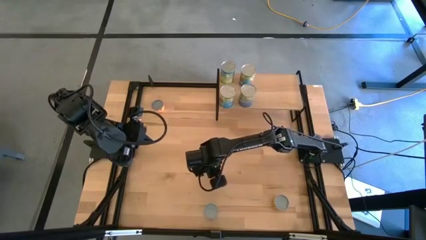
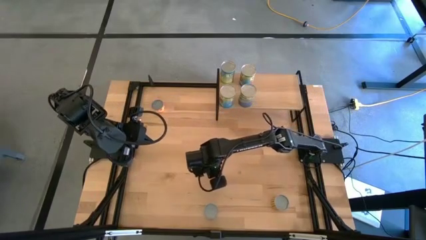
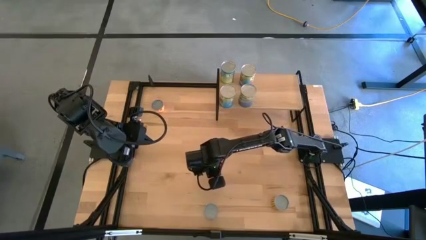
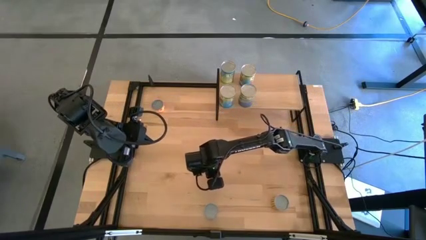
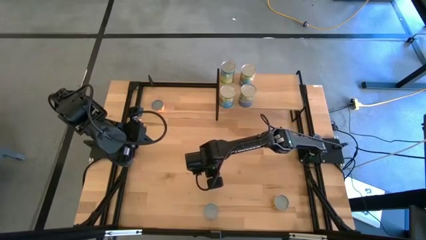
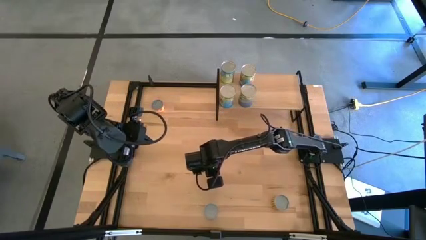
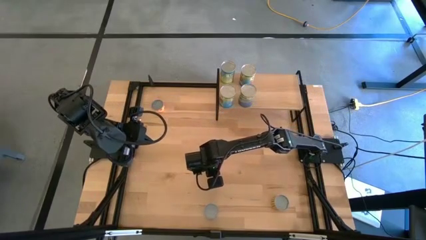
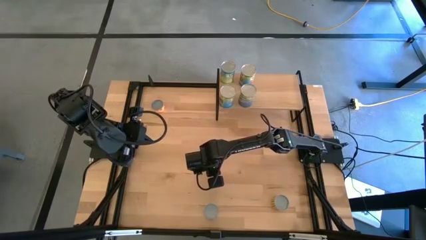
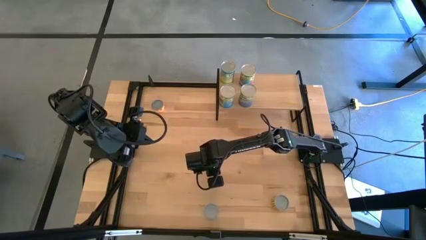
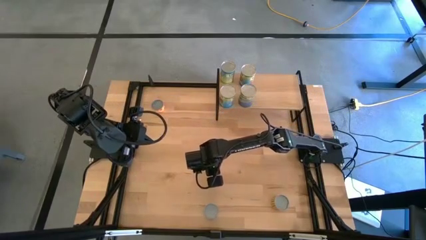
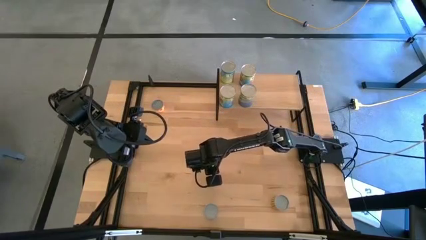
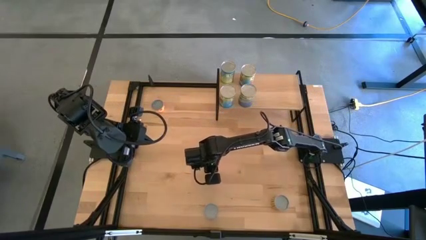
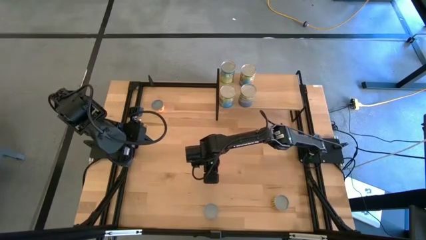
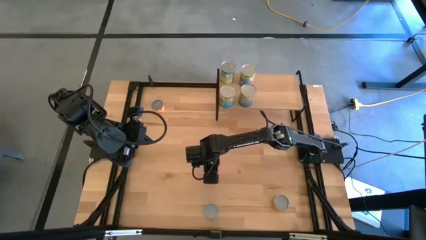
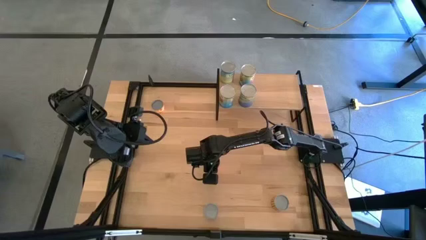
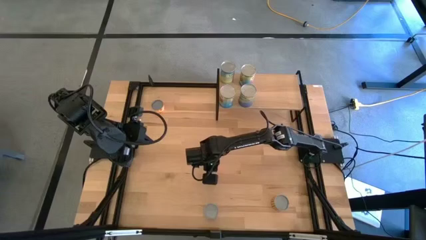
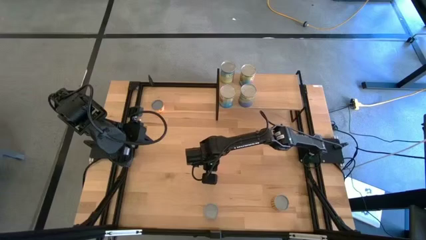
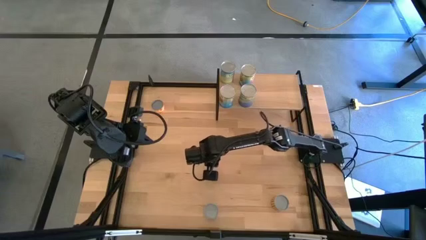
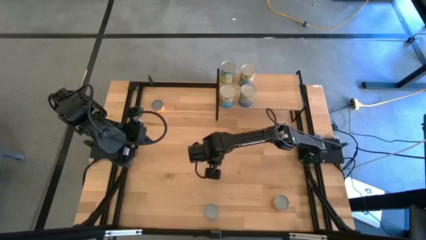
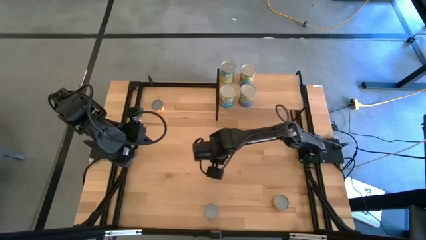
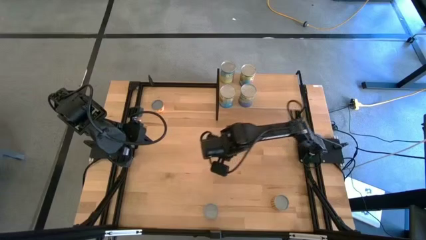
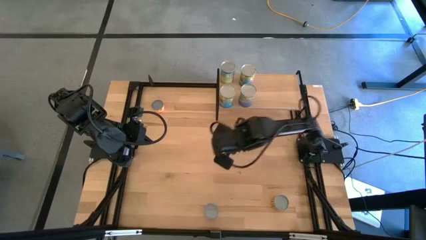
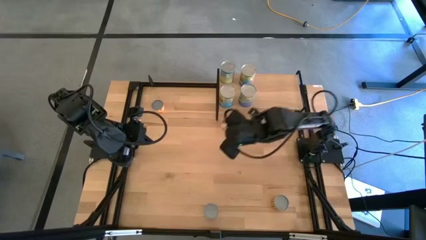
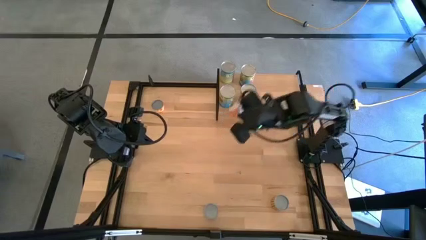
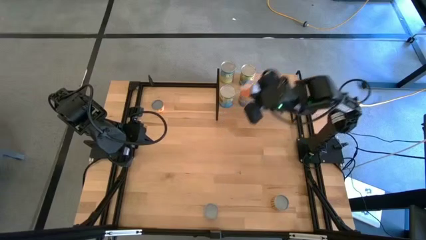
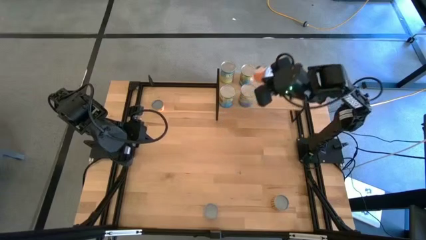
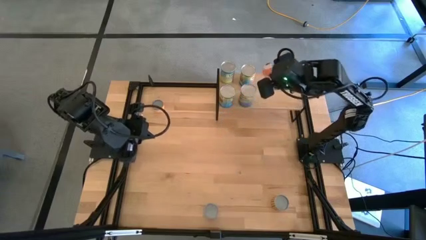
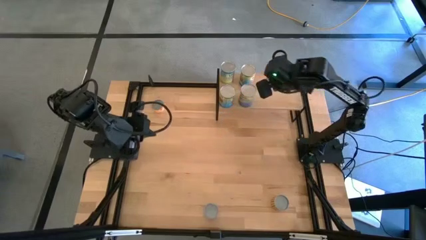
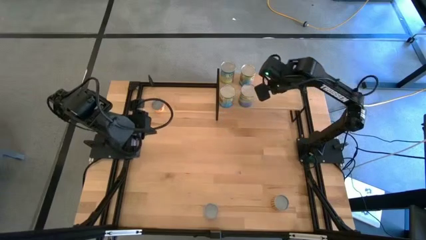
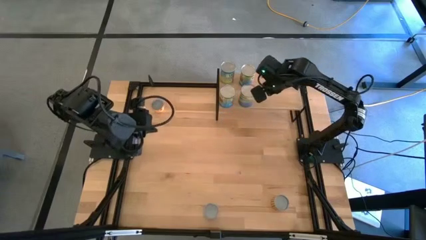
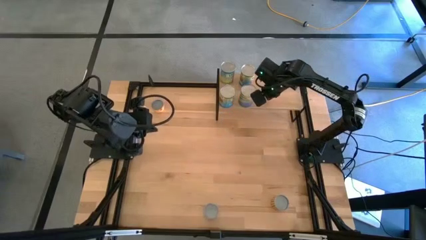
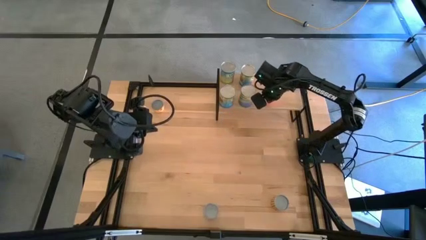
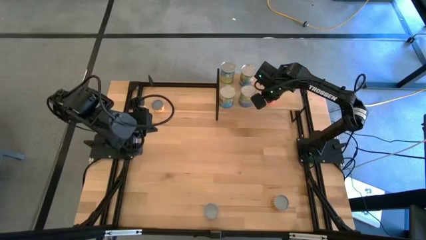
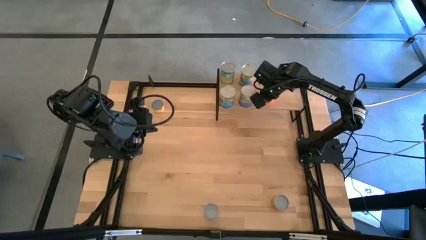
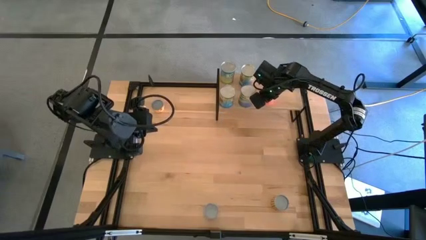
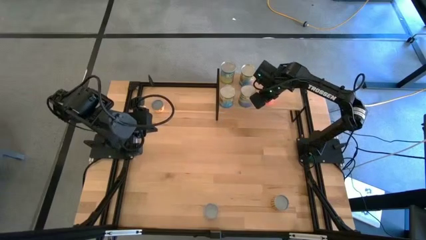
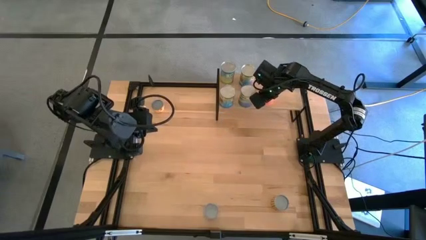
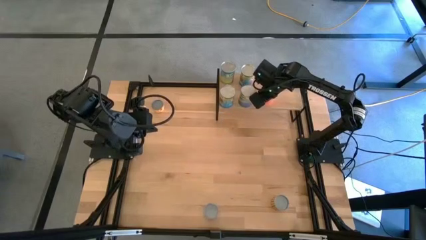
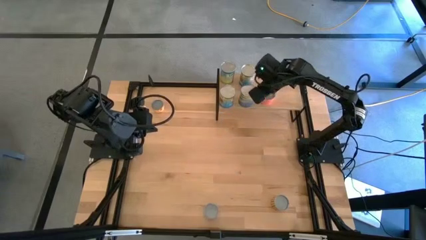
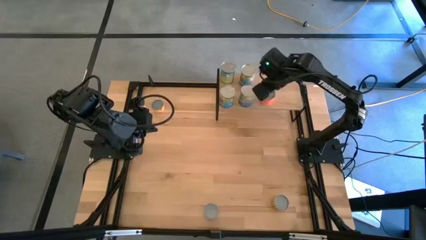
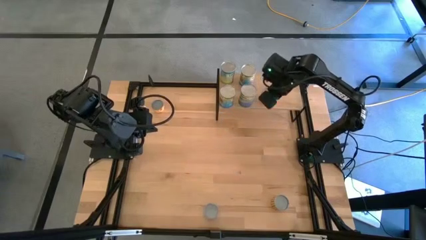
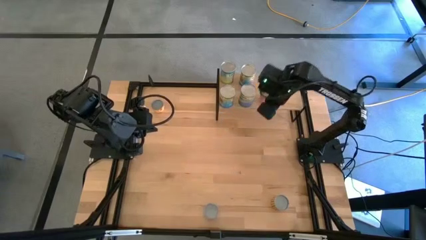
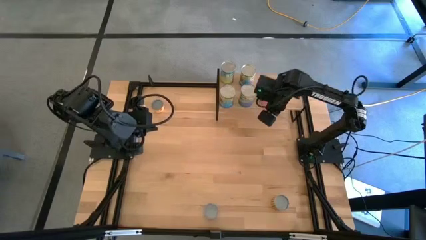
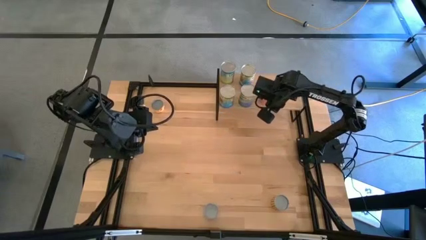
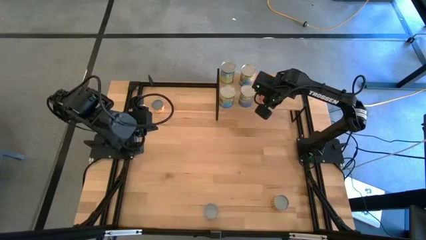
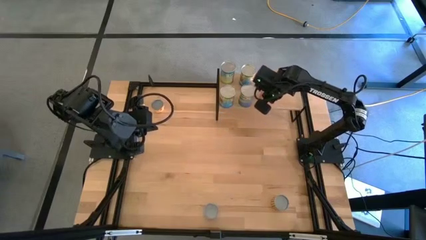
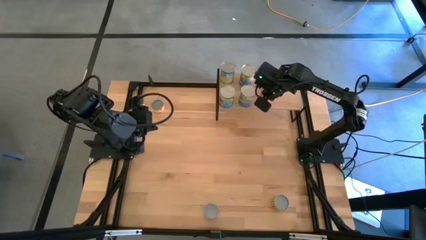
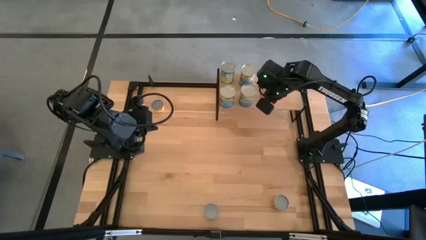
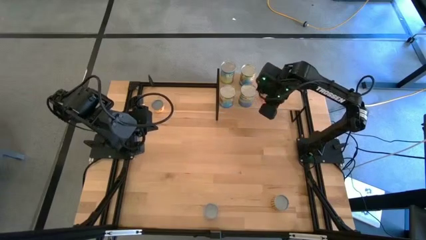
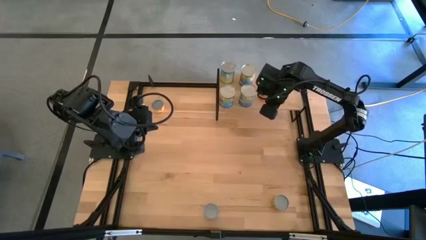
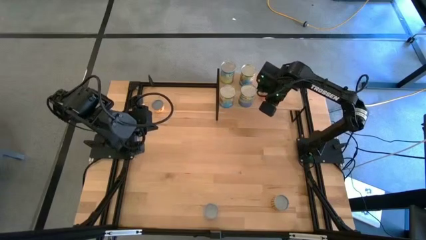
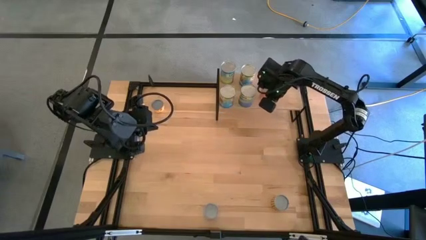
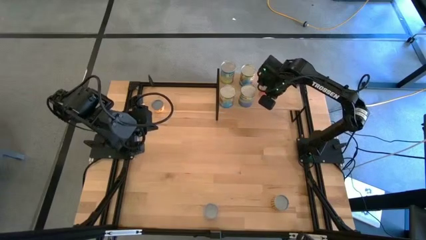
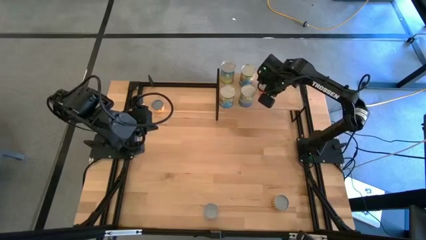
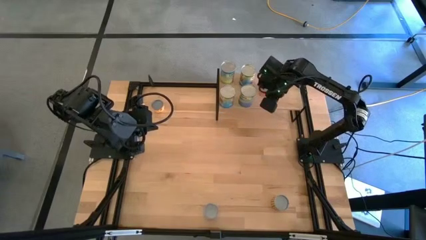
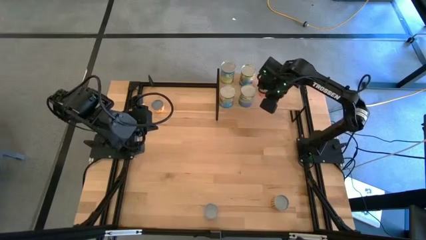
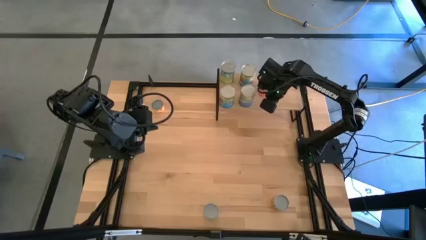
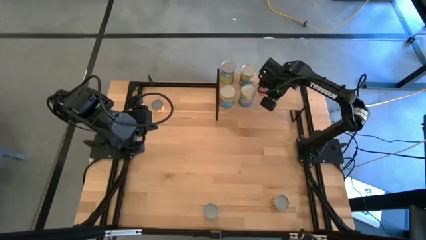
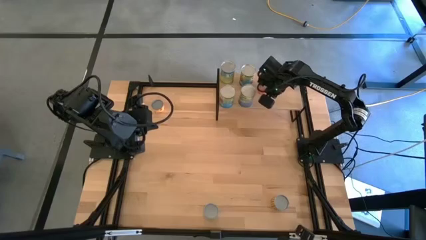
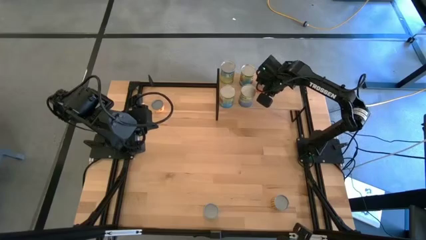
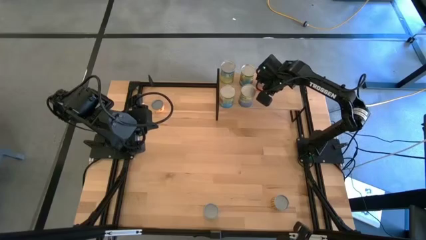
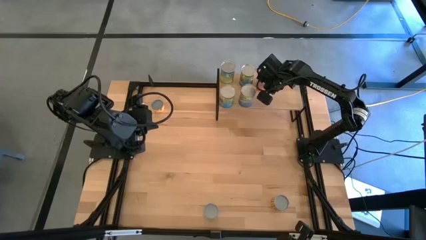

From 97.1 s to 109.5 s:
Task: Pick and place cans onto a shelf
Put the canned saucy meatballs on the shelf
